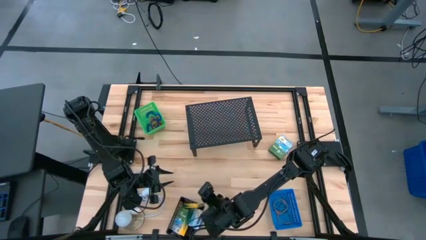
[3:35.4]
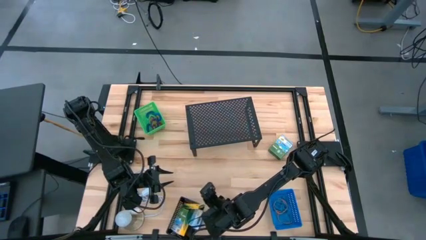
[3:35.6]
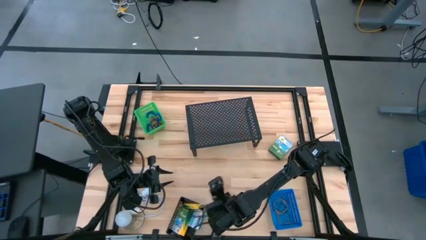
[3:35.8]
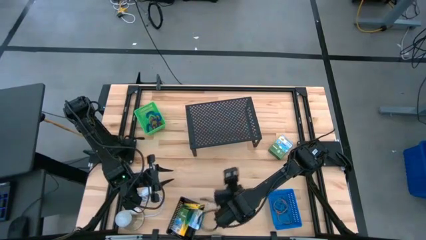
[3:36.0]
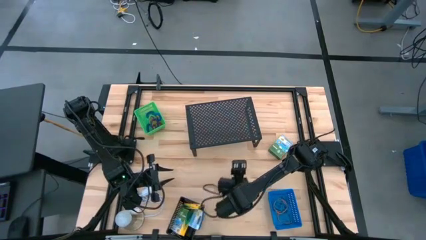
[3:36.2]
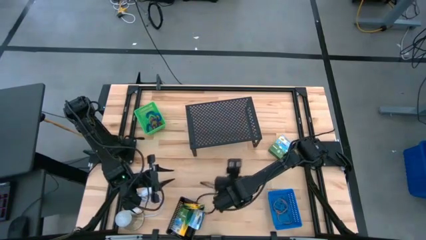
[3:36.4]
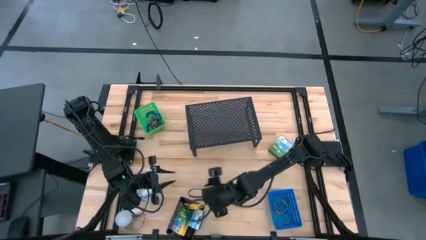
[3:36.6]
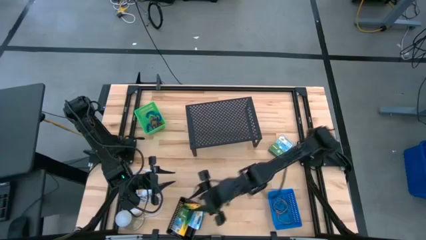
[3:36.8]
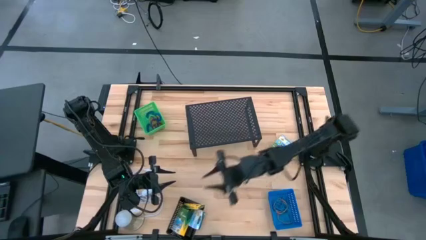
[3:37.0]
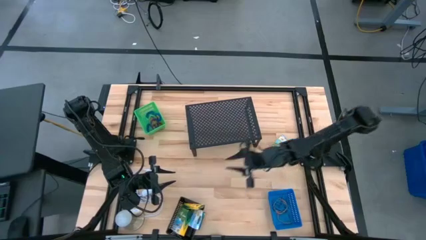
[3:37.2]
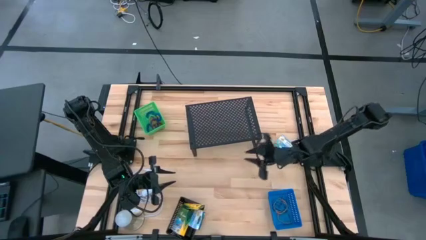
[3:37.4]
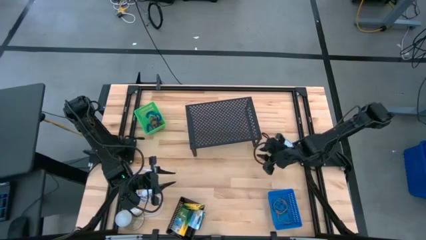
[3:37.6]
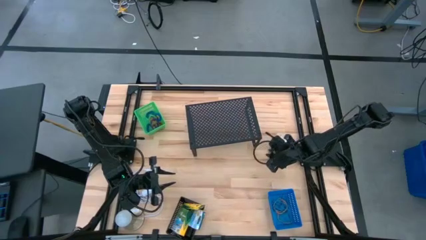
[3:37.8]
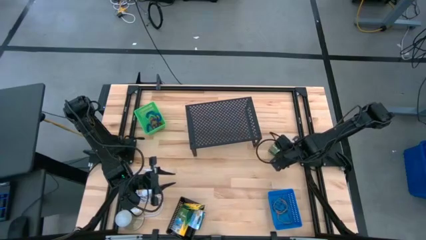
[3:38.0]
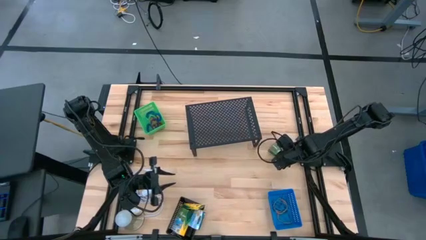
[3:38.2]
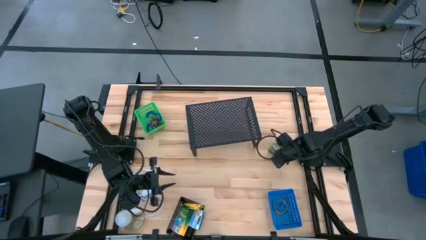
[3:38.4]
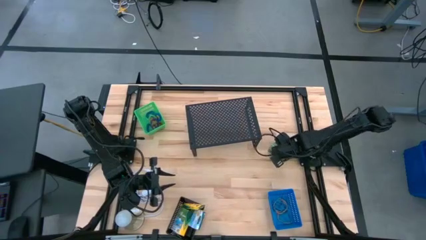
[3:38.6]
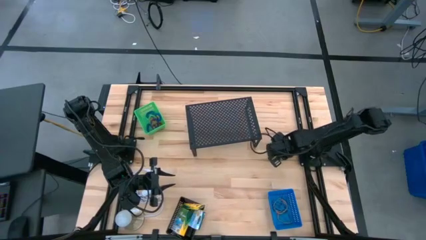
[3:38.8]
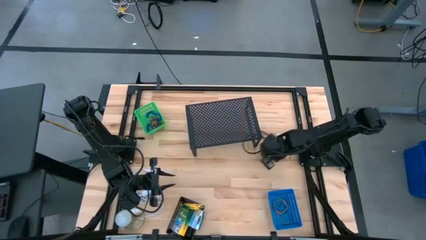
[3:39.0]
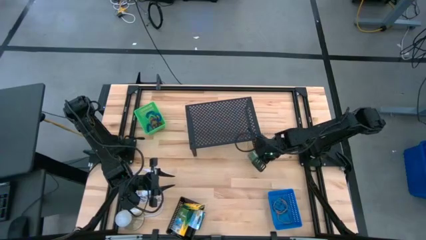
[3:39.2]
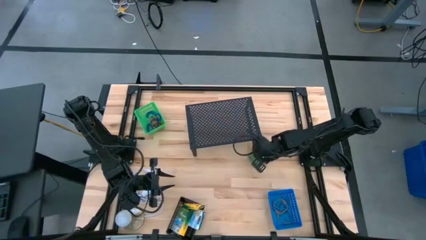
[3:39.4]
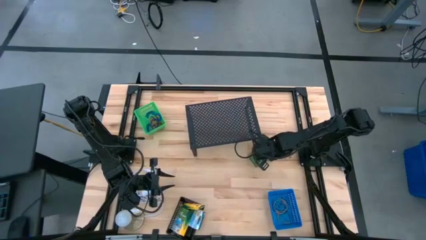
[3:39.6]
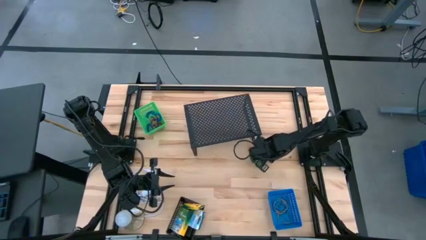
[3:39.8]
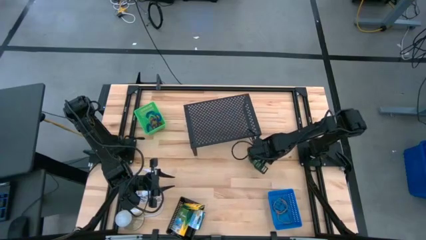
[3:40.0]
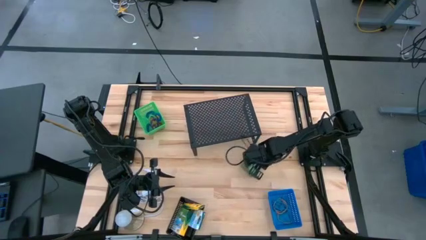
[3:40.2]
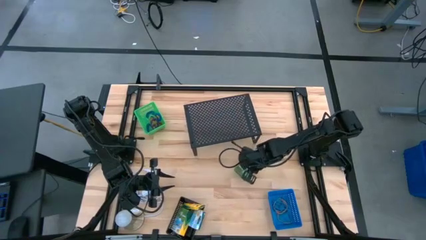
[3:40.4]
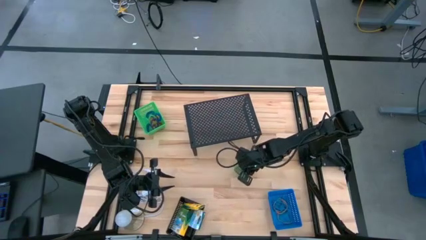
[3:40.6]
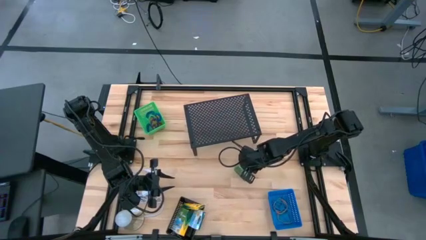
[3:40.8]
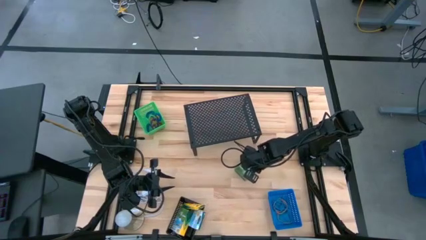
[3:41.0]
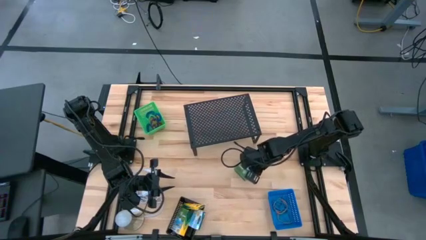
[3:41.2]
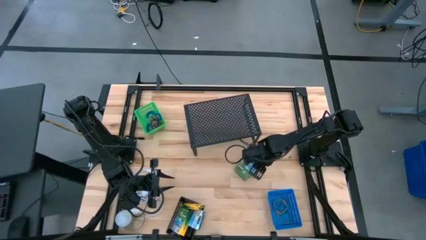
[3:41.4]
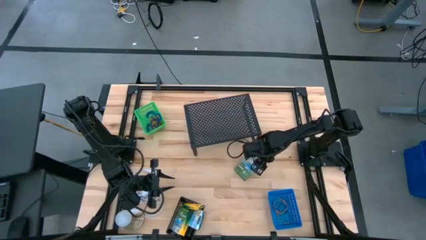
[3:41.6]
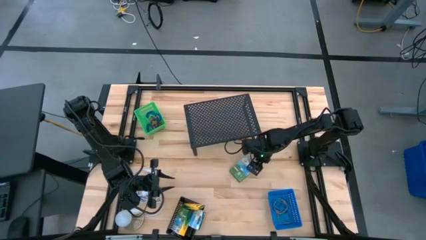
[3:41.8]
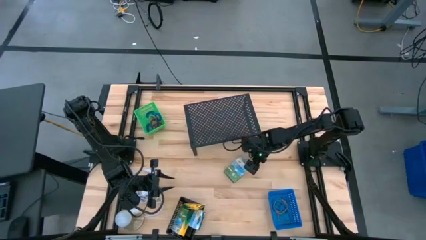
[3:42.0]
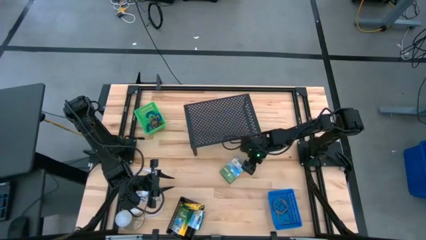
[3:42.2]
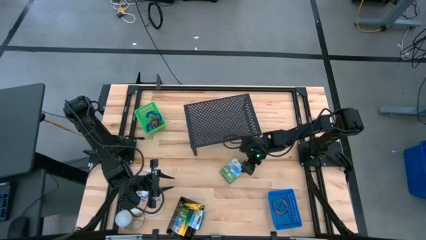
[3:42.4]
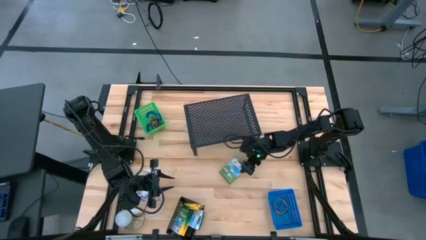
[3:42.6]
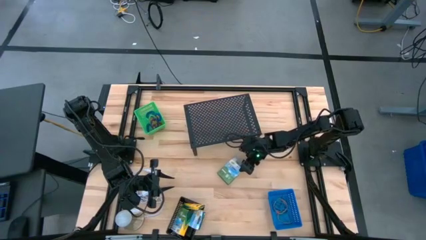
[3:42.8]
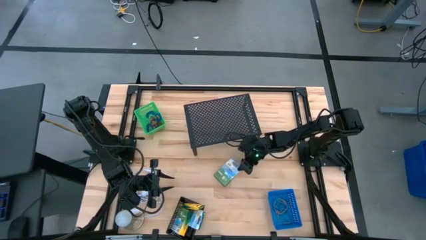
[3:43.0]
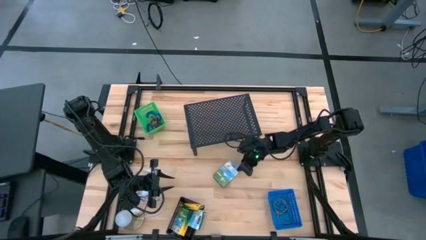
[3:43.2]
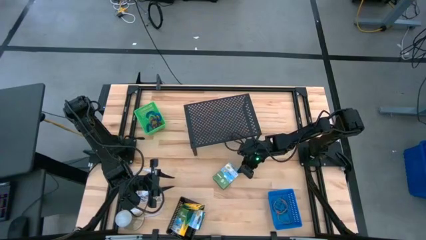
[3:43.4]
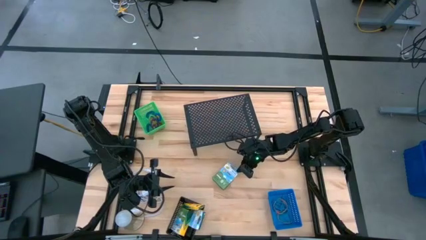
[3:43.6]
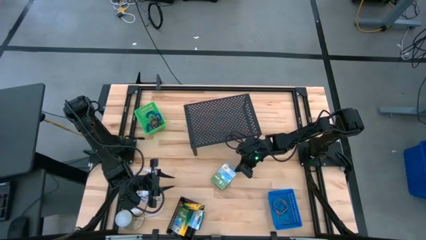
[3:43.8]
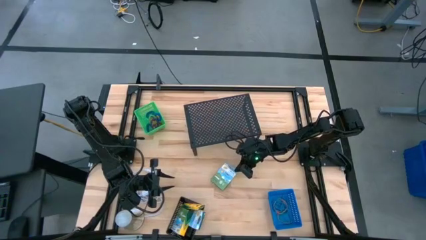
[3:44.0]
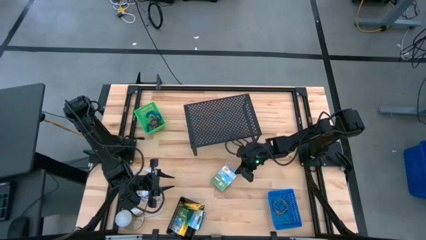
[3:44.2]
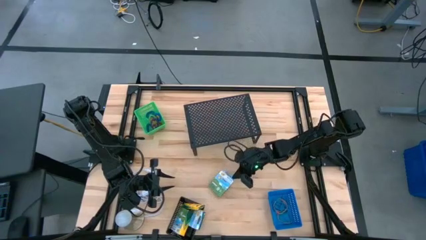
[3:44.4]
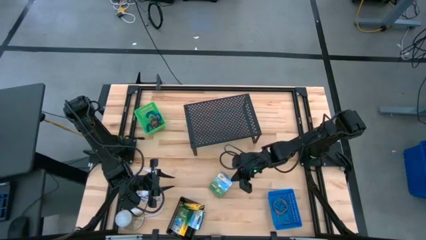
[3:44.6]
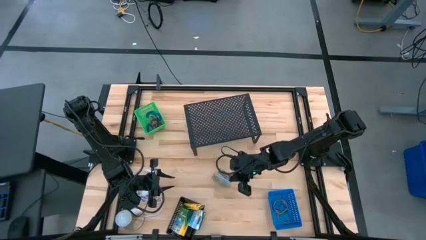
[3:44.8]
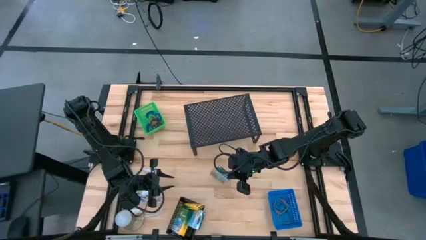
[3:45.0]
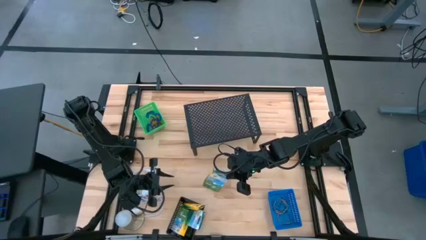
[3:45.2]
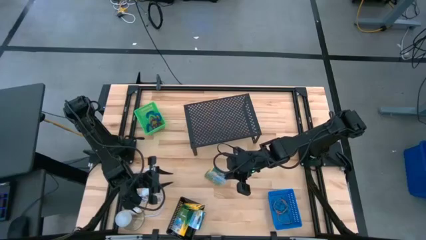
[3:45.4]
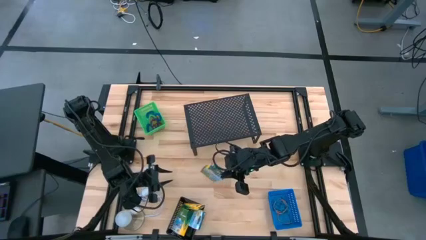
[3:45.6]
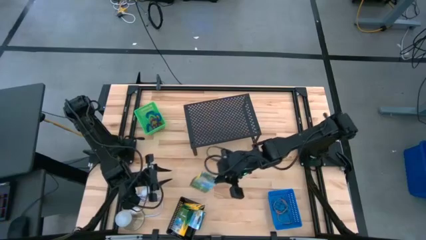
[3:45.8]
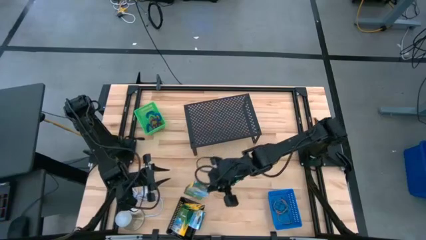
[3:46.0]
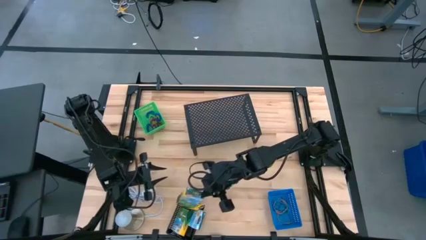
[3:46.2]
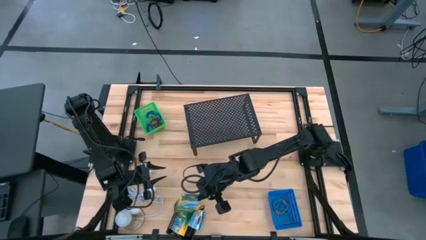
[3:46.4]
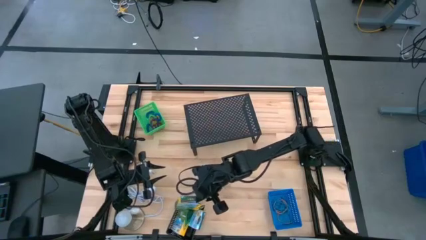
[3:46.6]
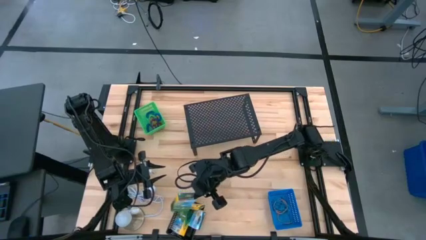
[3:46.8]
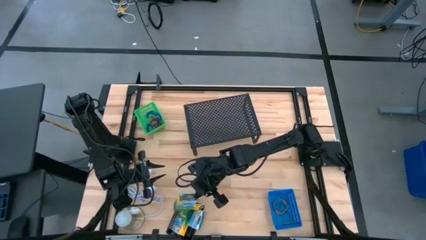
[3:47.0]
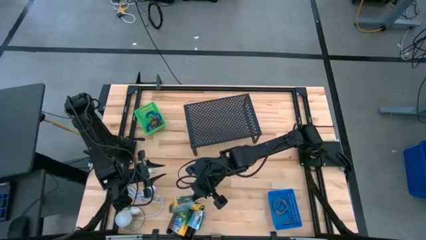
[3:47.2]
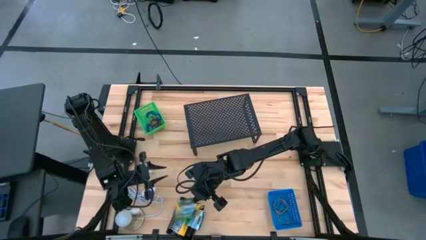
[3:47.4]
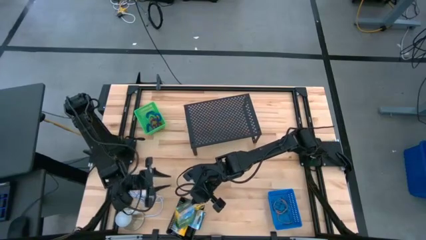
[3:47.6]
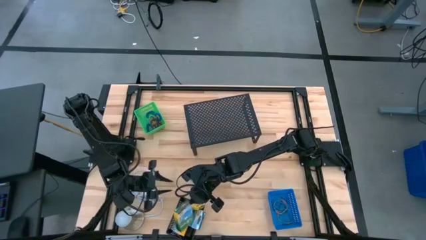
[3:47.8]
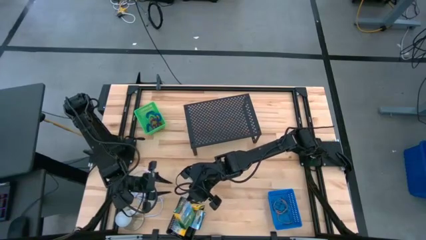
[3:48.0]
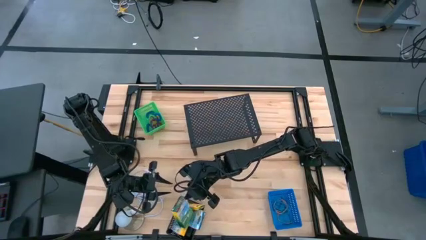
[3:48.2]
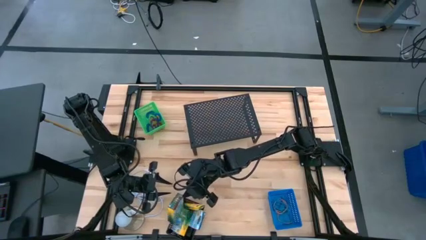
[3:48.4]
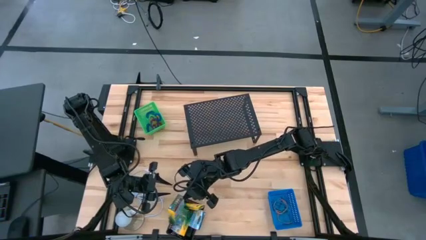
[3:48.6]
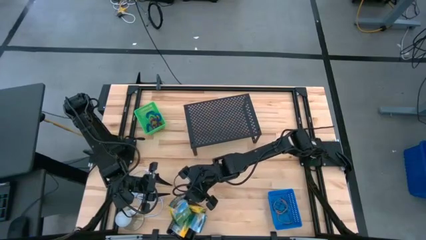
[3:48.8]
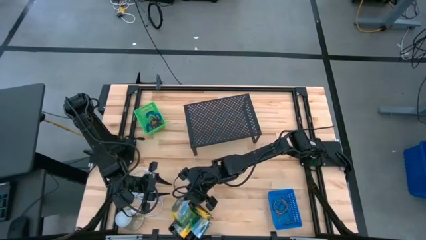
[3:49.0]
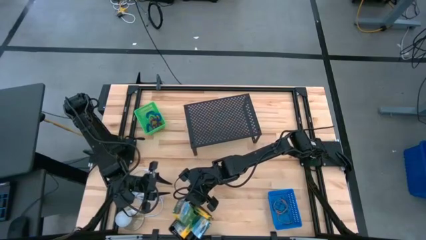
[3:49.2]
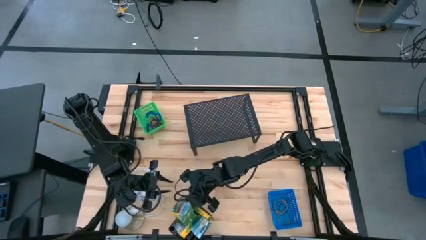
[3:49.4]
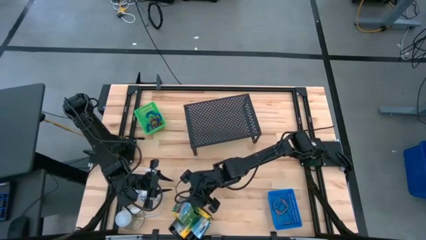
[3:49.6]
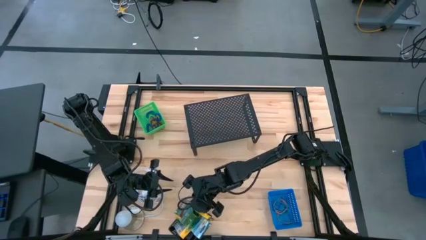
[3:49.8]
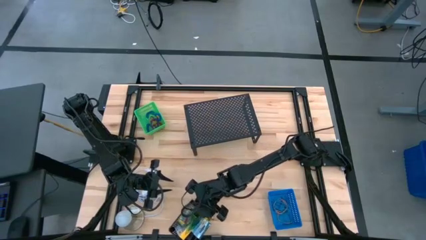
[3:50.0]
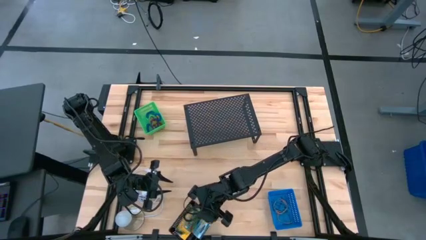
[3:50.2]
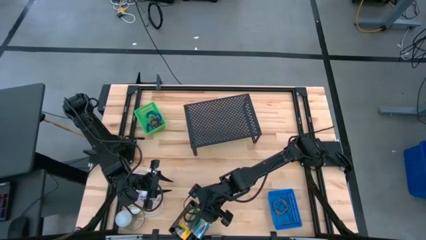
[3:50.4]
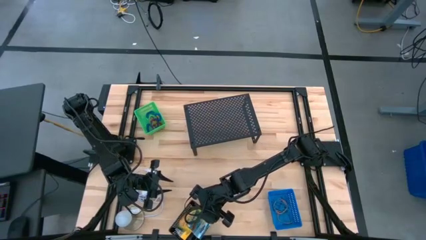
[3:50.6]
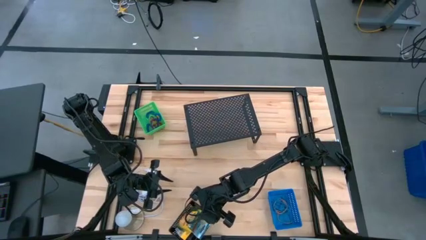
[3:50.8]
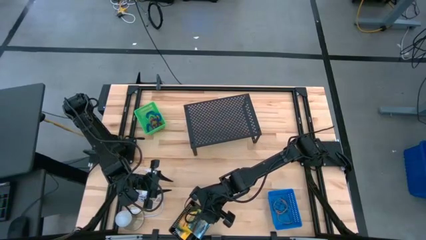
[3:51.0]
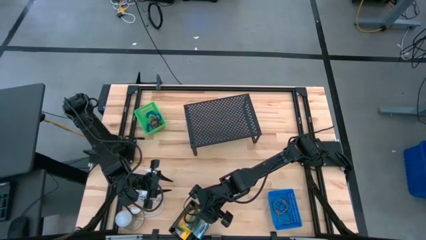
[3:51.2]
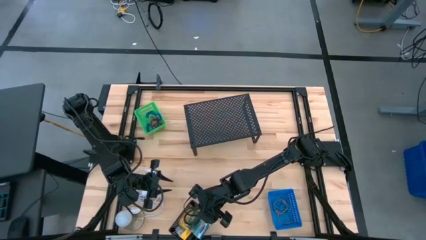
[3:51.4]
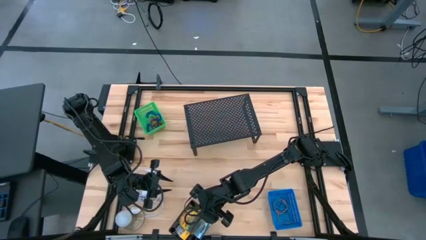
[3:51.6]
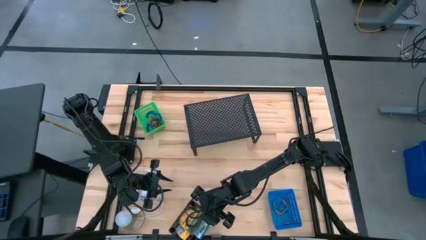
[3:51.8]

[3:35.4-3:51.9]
Task: Pick & Place Office Desk Supplies
Put the yellow crayon box into the black bin

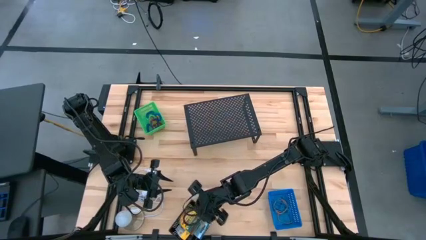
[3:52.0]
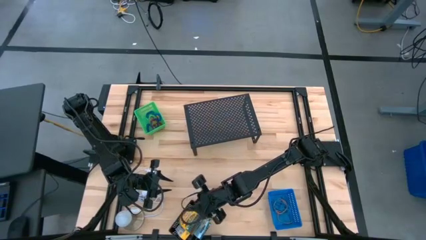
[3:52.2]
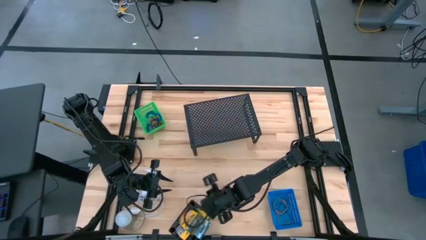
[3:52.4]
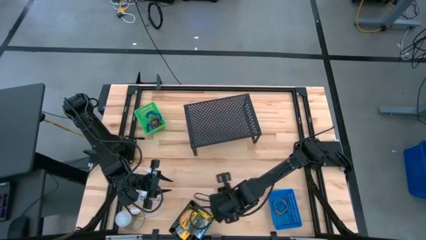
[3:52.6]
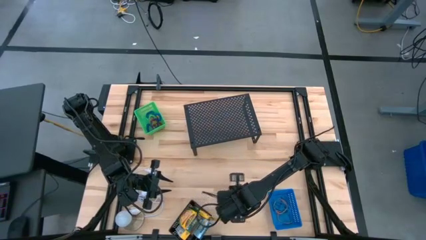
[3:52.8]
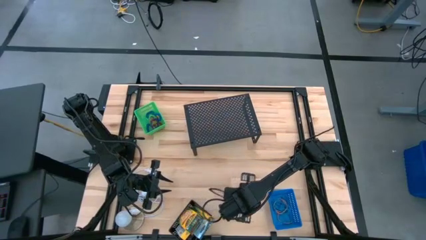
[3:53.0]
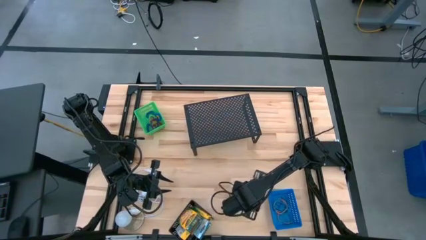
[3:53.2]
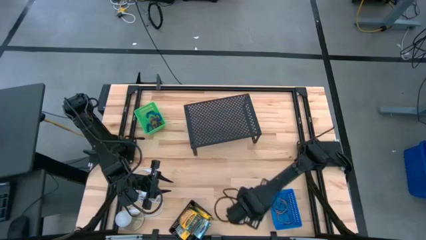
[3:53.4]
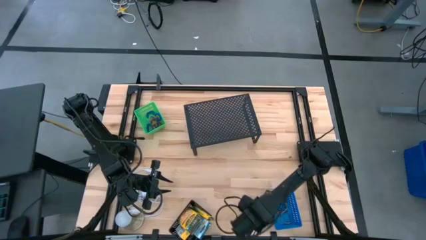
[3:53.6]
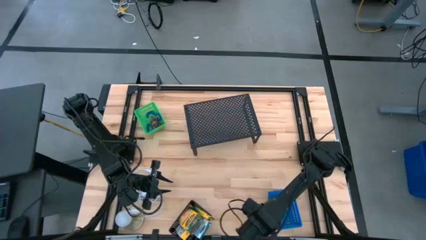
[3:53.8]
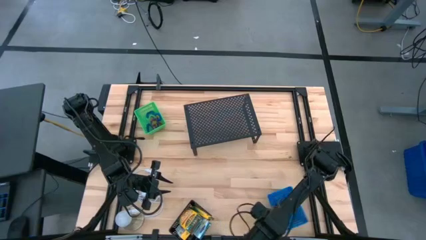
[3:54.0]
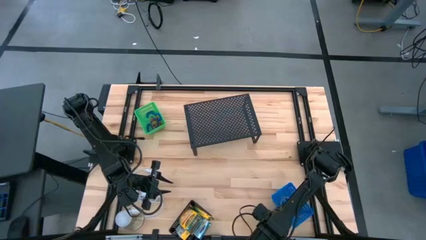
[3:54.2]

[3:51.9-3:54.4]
Put the blue bin on the shelf
